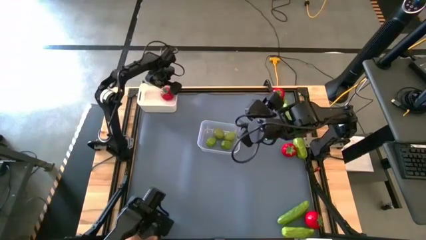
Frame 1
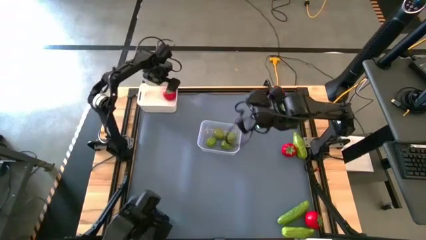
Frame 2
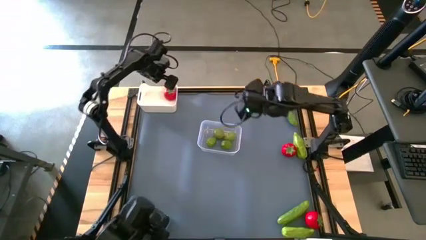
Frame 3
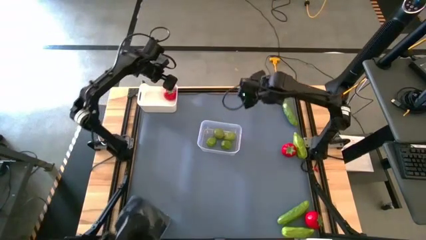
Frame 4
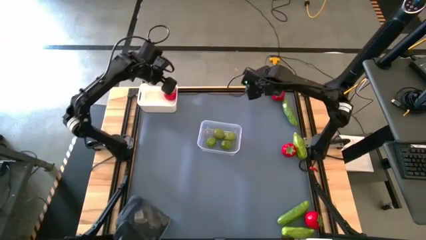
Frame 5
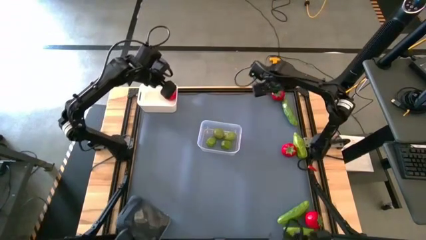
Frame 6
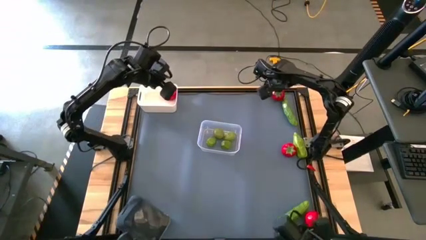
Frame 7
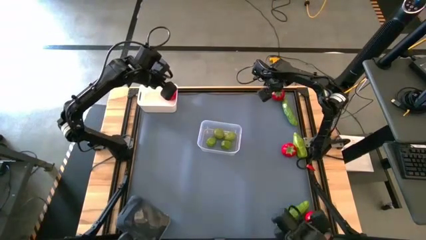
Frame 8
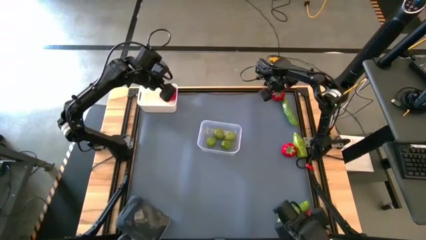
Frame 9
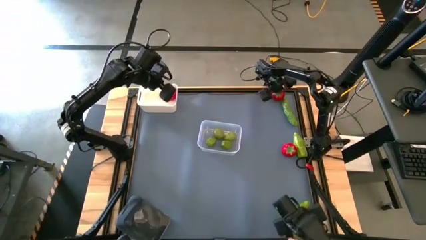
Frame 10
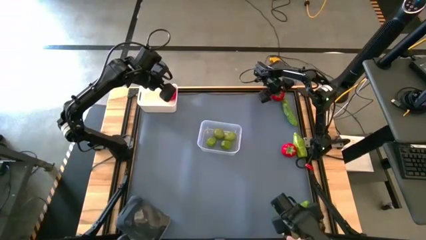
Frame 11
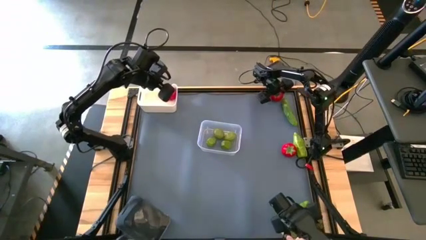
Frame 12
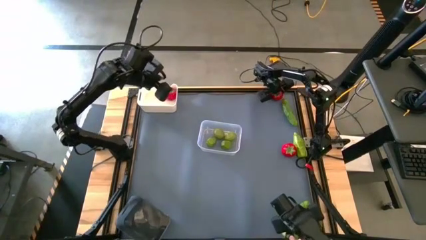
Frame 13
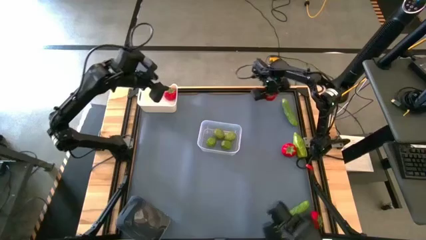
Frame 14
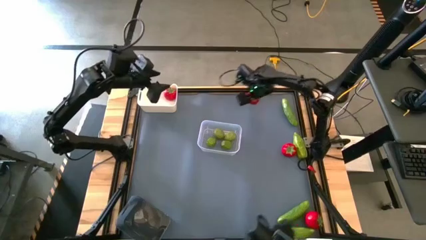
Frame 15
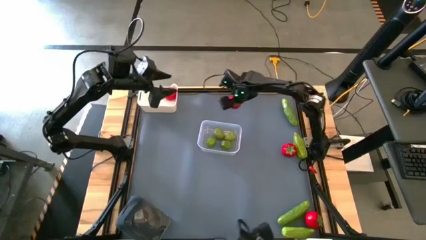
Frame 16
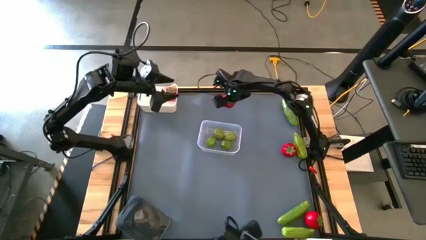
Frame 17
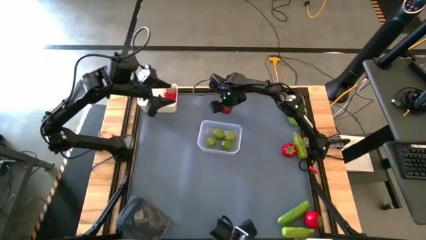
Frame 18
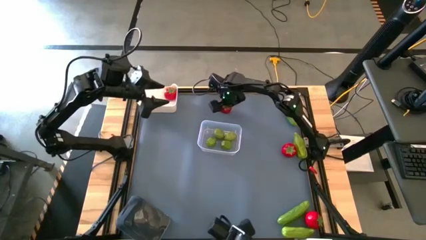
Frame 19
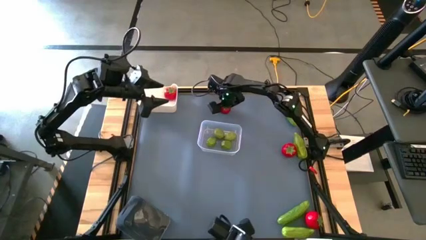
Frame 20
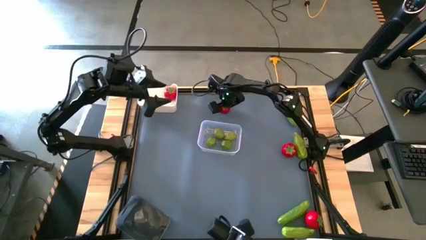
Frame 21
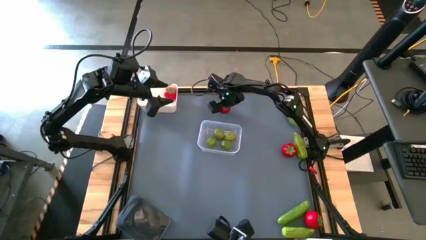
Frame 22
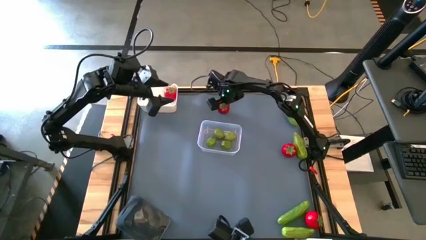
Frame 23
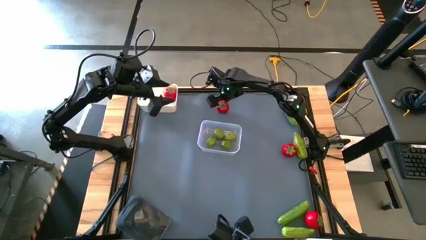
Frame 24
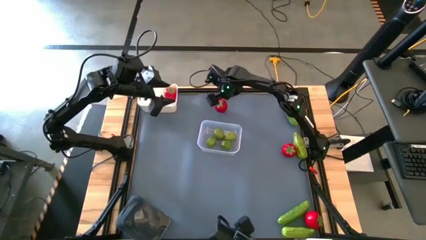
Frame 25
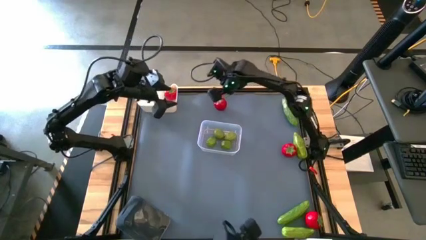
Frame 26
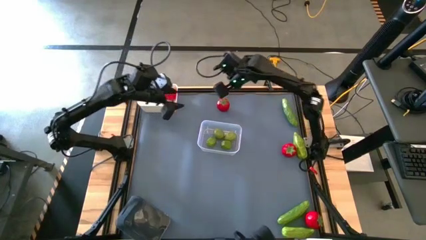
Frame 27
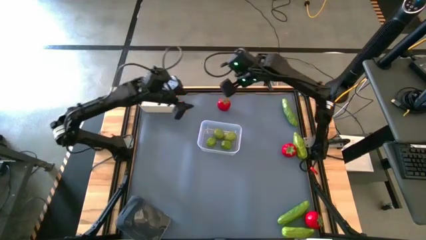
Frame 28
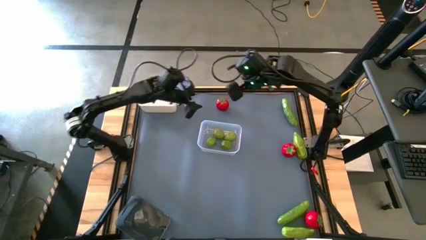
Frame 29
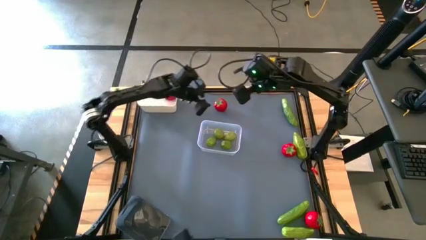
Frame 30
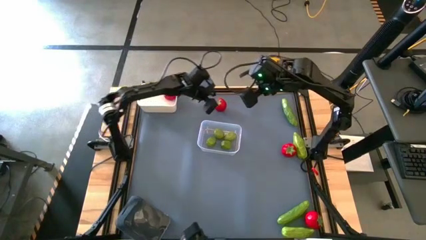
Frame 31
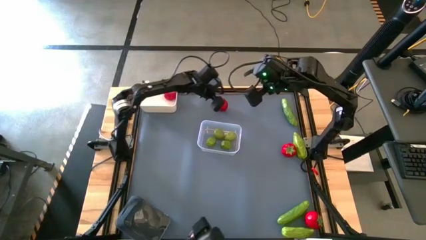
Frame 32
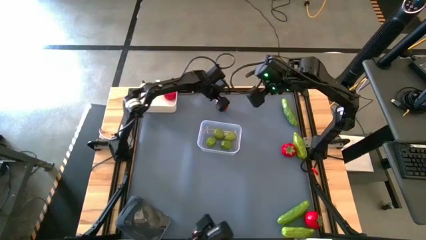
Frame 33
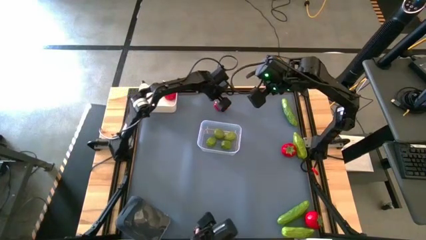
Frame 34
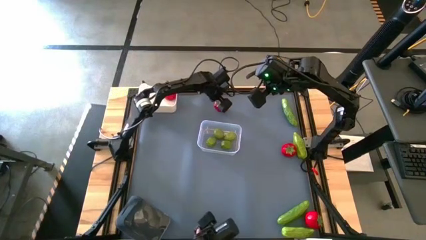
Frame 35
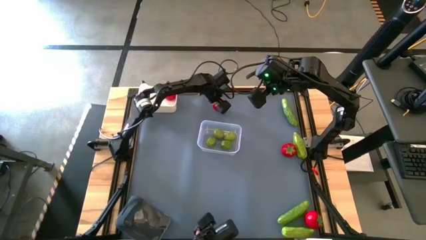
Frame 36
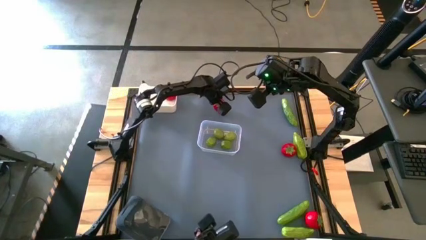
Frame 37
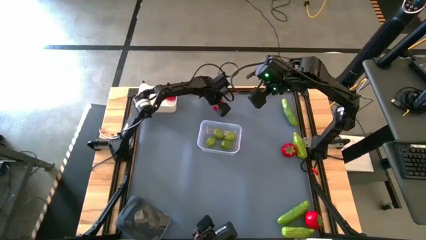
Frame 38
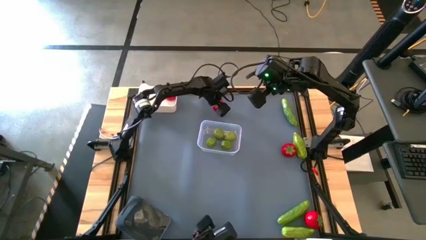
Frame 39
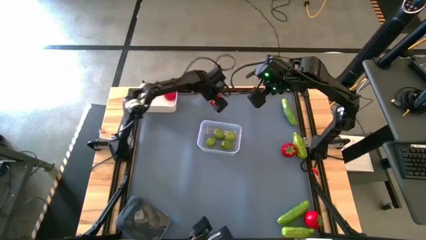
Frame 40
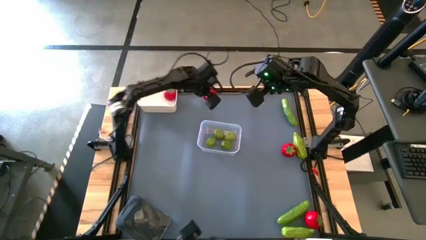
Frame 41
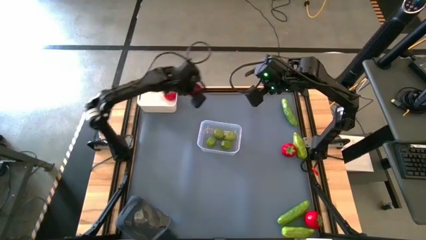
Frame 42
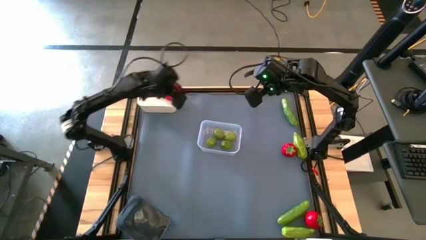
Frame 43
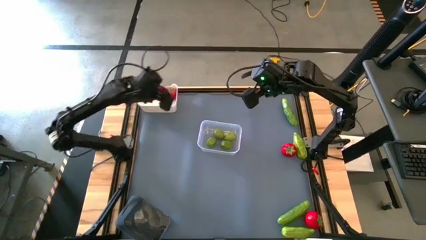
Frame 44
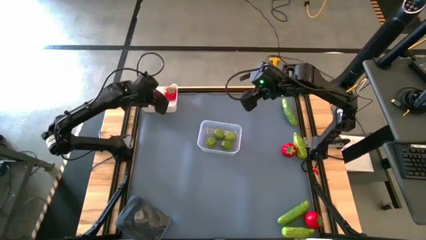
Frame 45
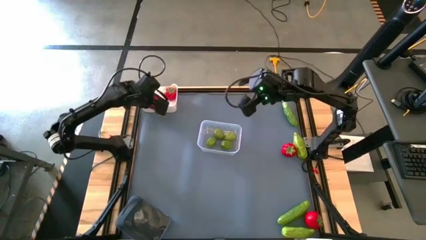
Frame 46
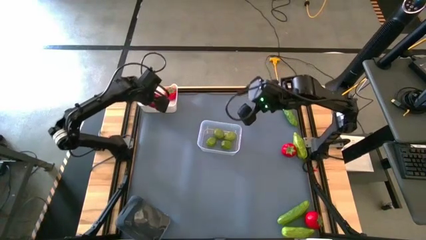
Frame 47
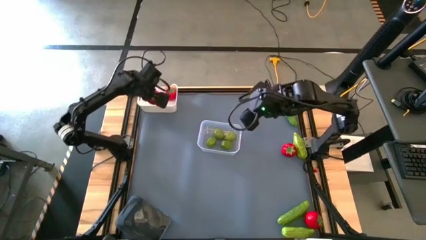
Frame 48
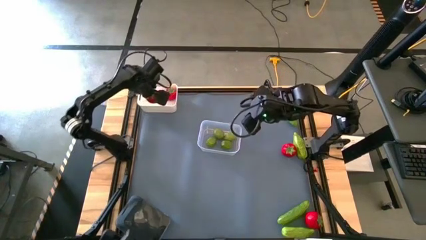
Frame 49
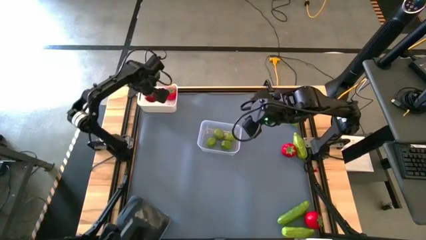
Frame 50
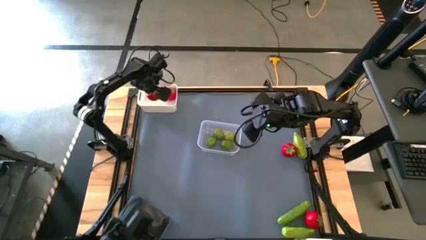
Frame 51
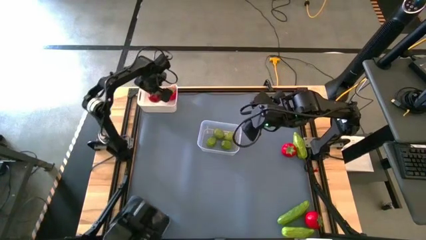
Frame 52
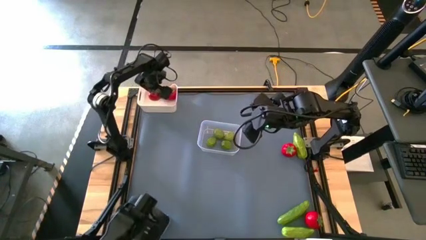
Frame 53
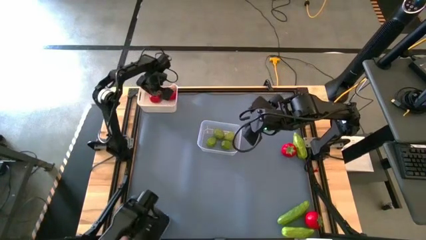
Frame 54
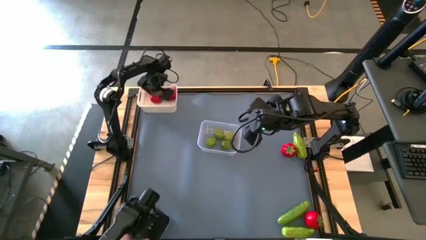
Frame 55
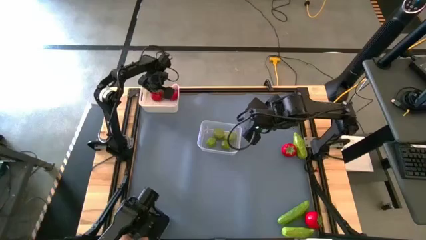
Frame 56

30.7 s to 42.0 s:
Task: Sort produce into baskets
Put the top right tomato into the white bin
